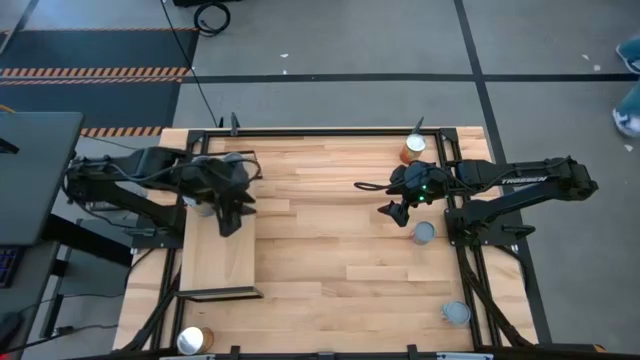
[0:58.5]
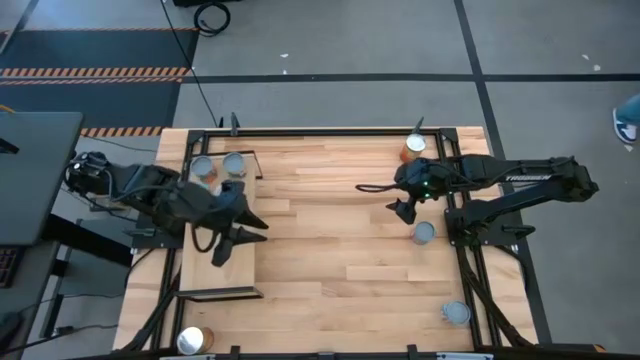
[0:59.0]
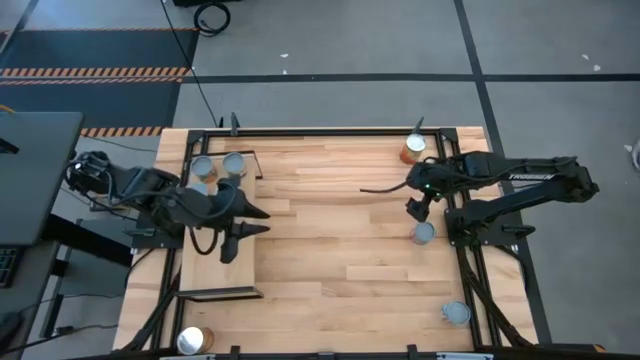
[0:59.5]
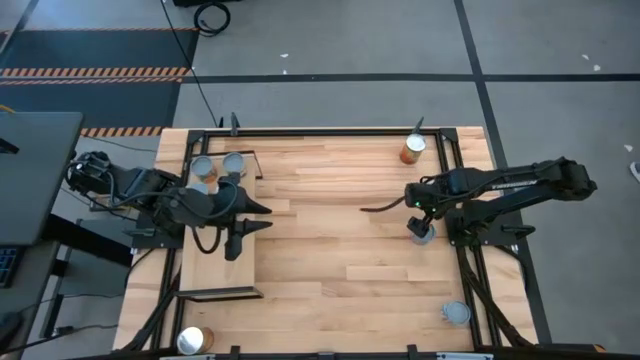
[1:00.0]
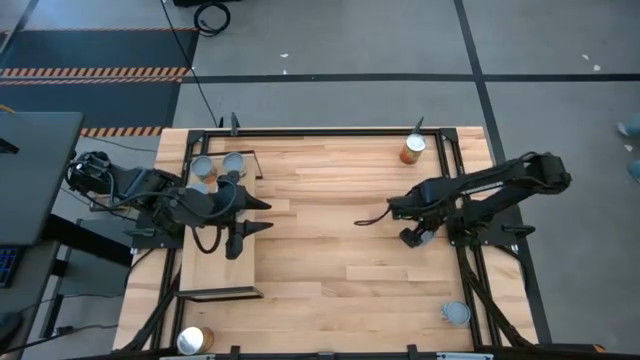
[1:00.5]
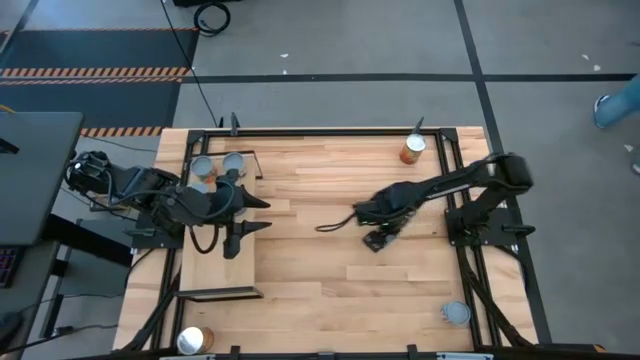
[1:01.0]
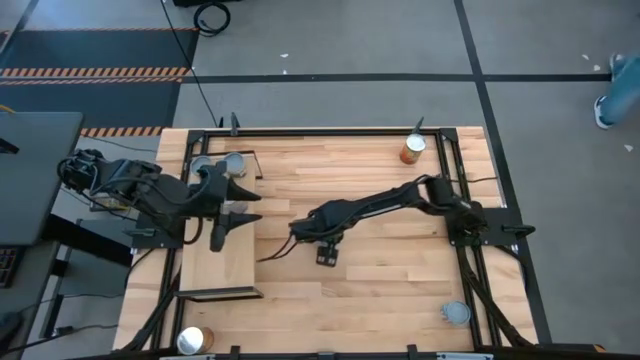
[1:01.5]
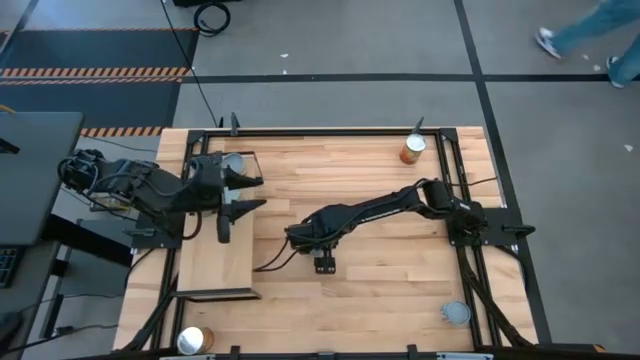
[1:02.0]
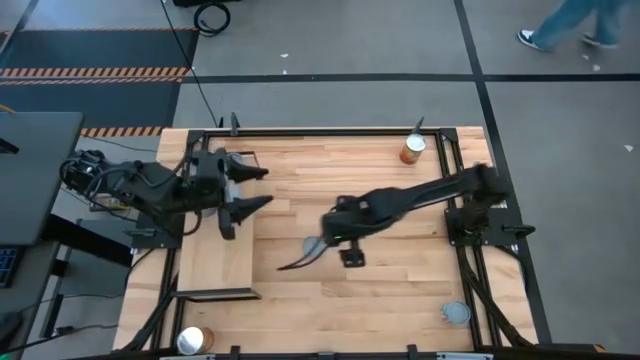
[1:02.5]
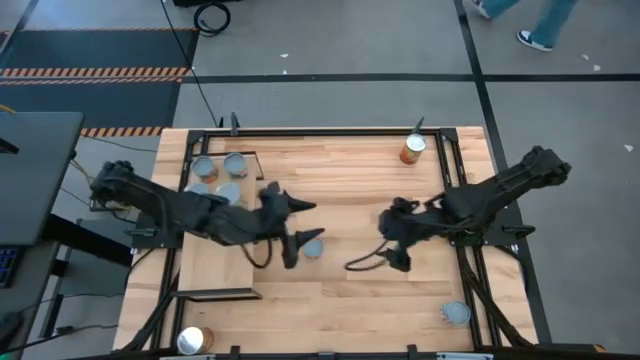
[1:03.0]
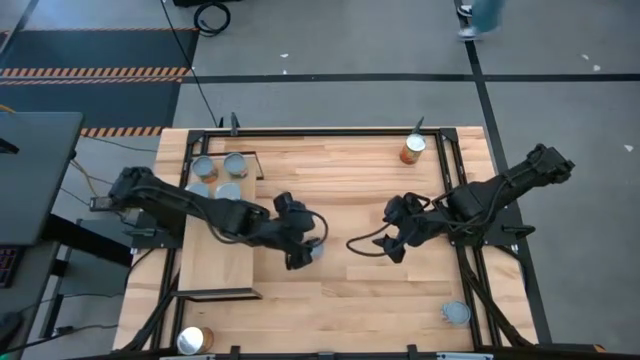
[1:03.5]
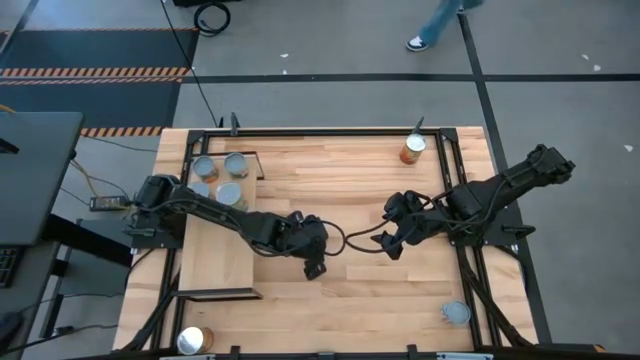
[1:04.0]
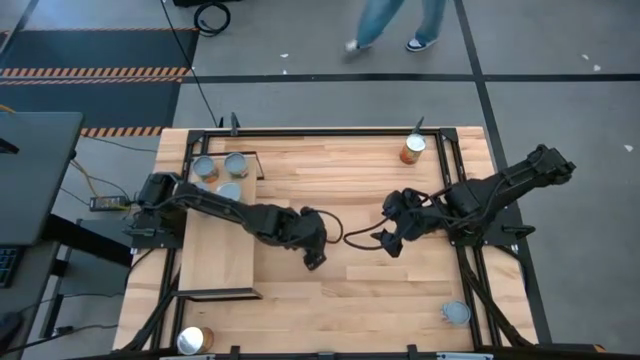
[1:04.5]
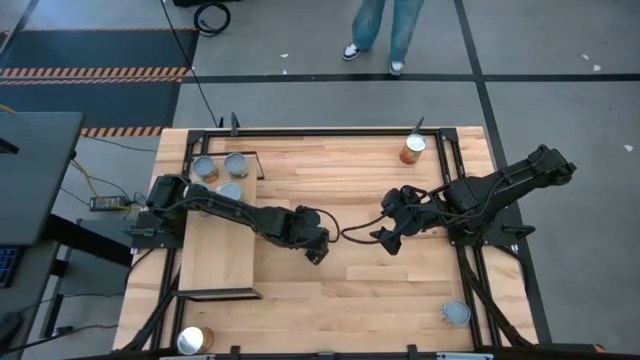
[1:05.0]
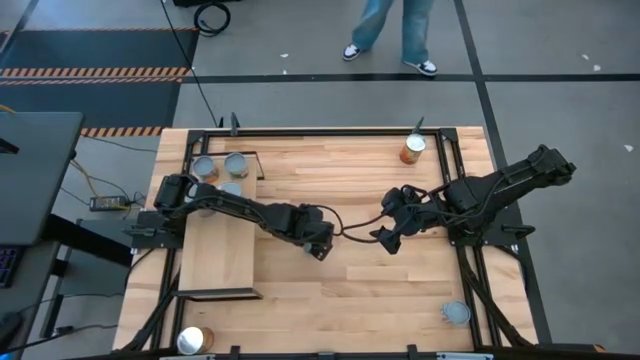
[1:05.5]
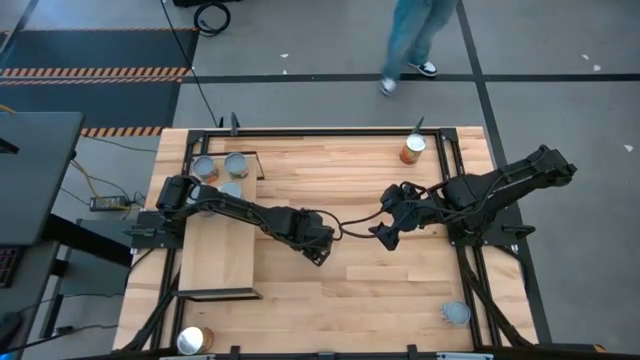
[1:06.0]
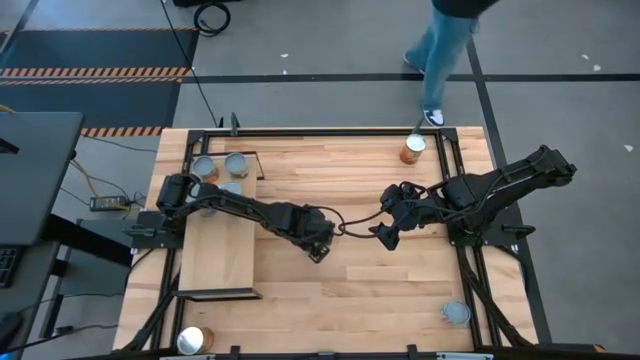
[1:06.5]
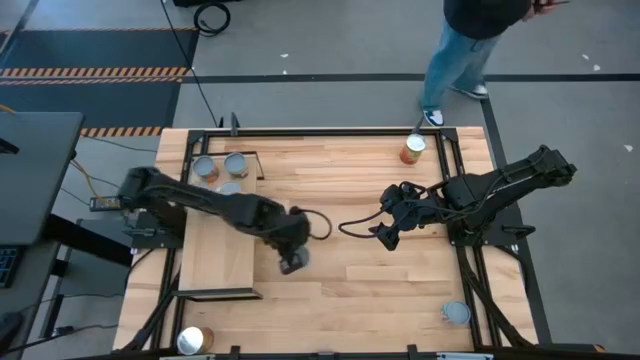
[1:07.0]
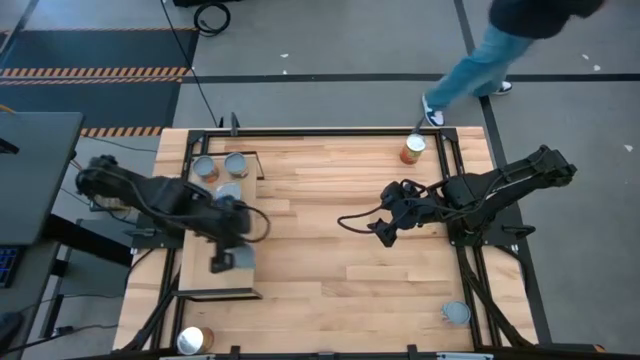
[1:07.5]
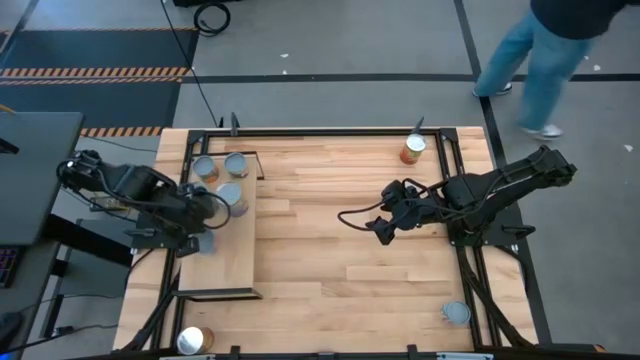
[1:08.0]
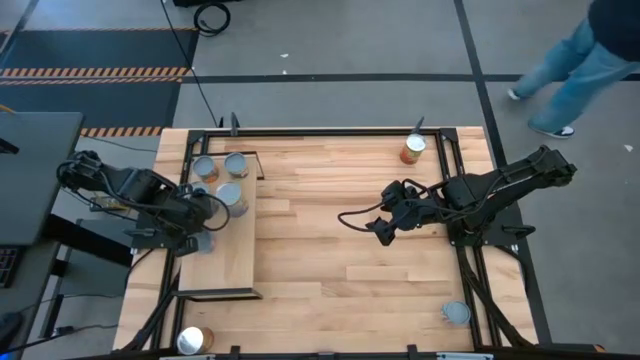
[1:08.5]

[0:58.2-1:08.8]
Task: Pick and place cans onto a shelf
Put the canned peas on the shelf

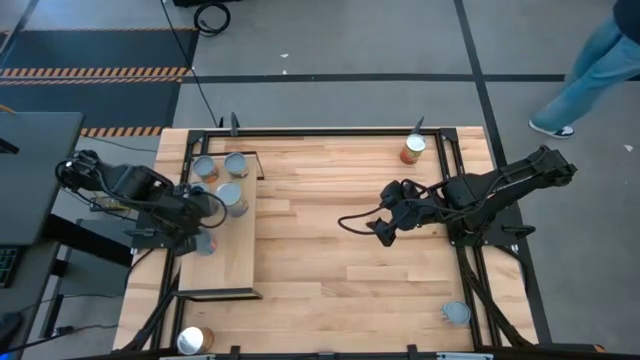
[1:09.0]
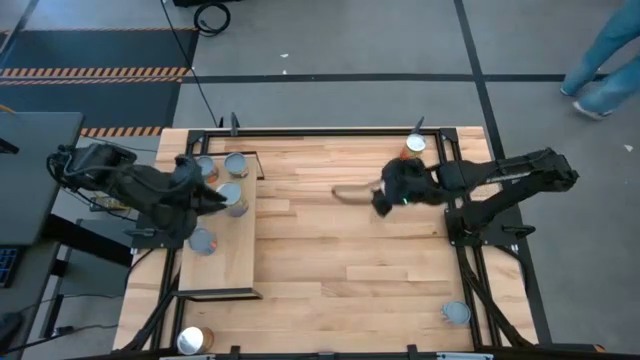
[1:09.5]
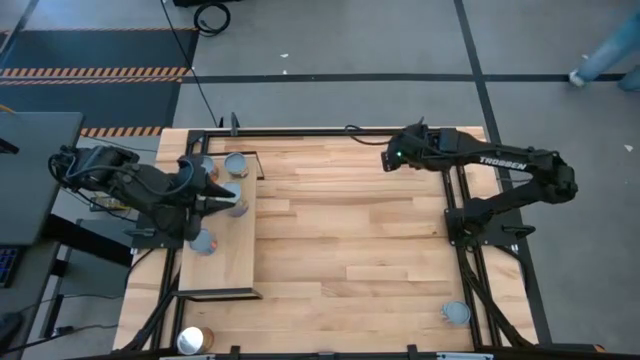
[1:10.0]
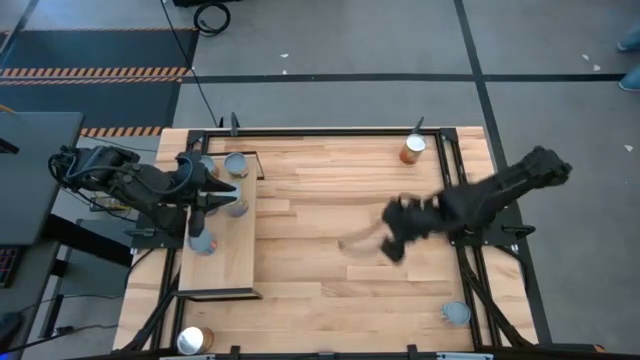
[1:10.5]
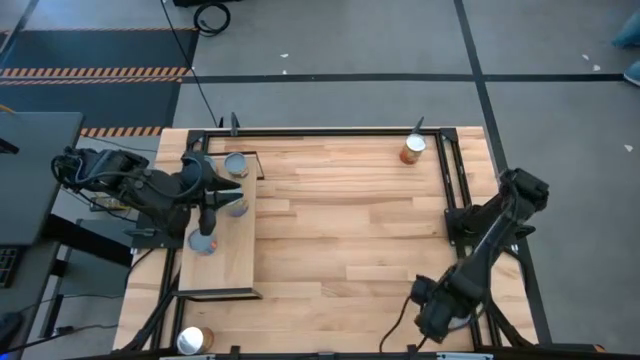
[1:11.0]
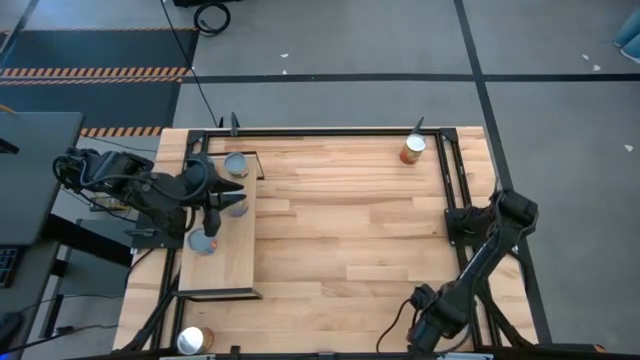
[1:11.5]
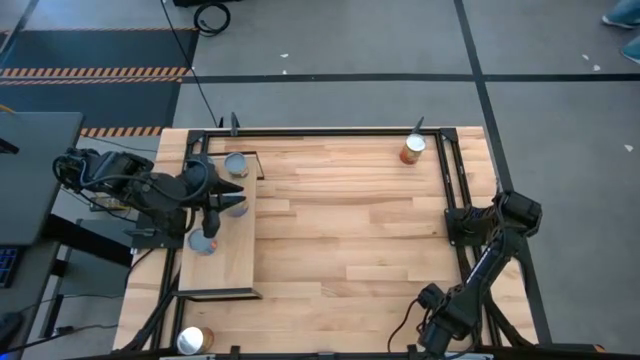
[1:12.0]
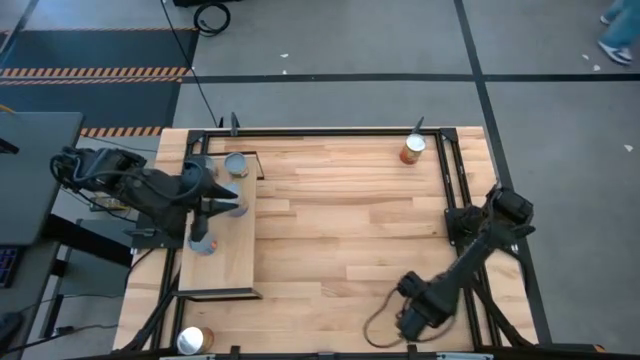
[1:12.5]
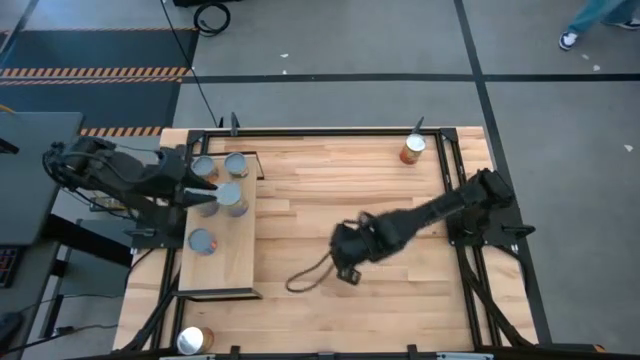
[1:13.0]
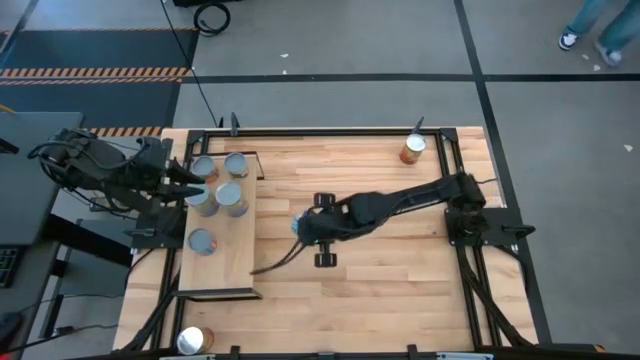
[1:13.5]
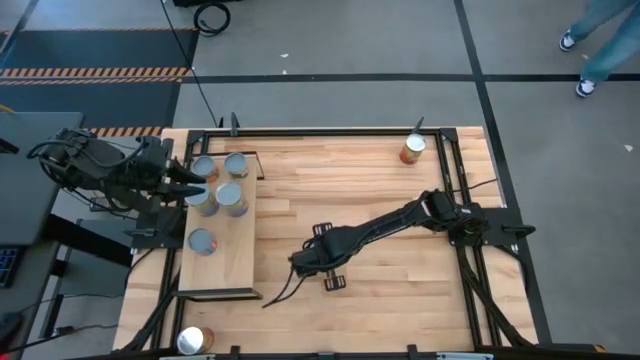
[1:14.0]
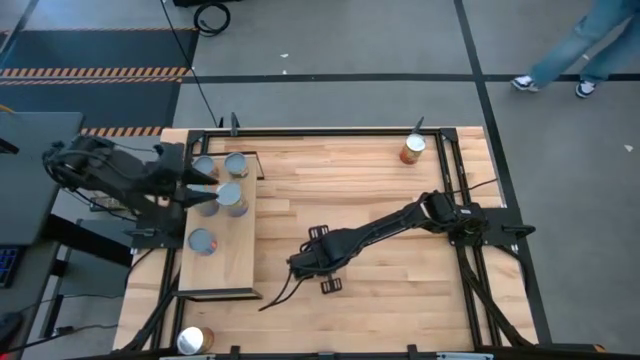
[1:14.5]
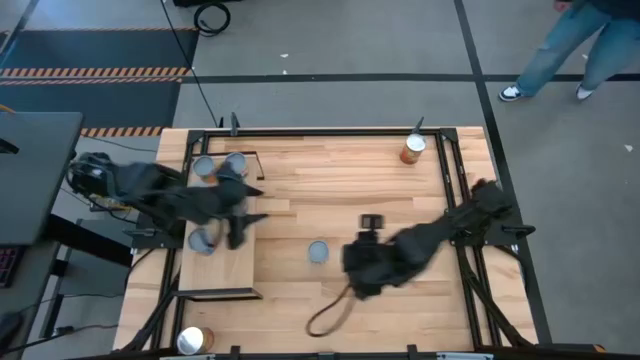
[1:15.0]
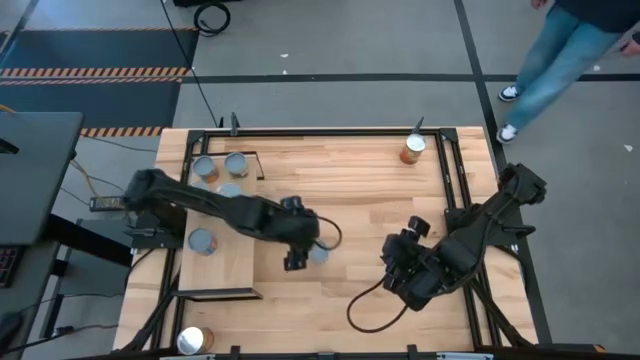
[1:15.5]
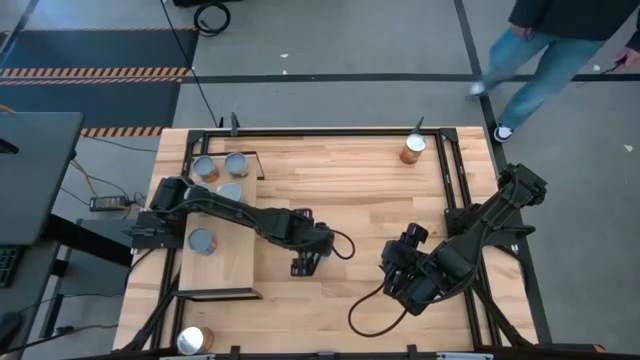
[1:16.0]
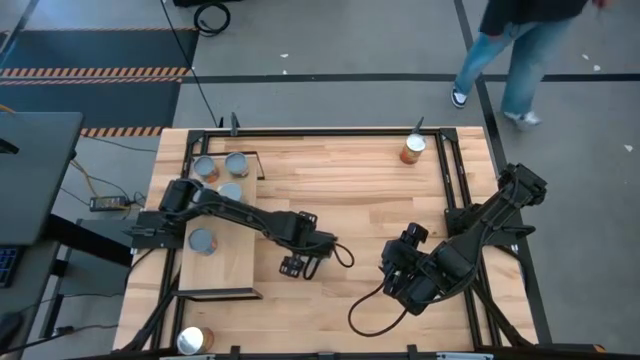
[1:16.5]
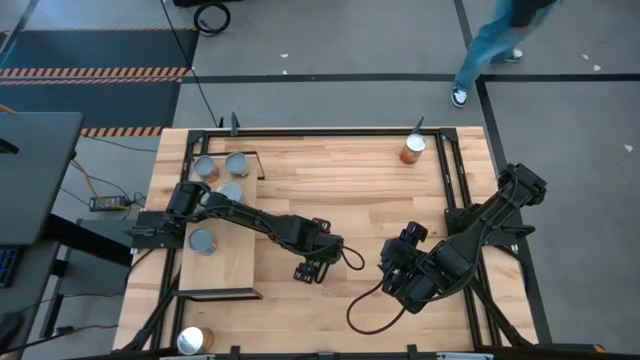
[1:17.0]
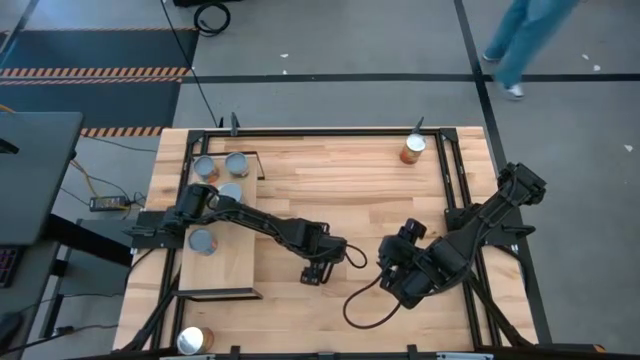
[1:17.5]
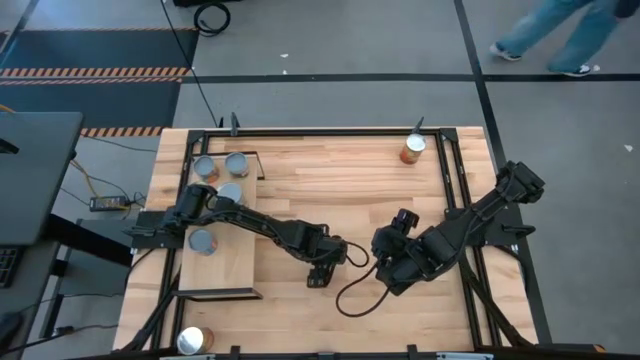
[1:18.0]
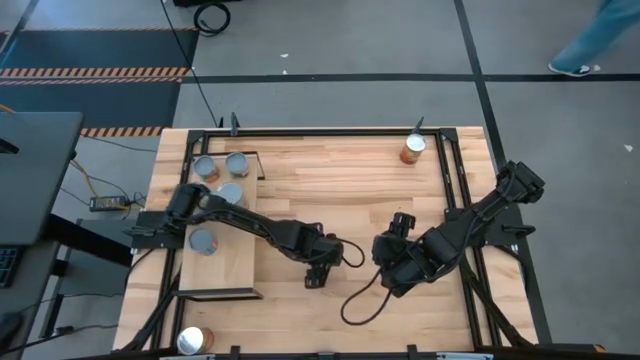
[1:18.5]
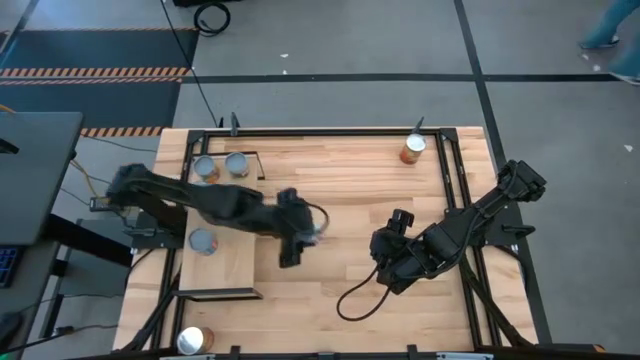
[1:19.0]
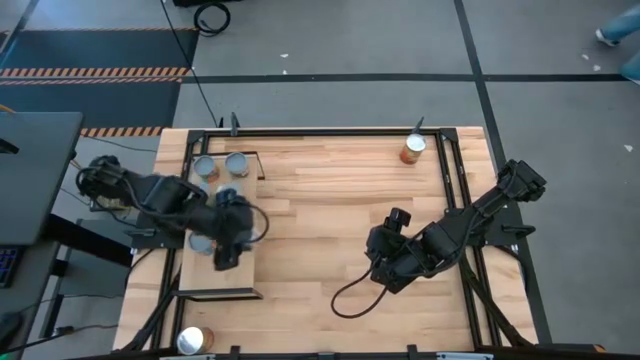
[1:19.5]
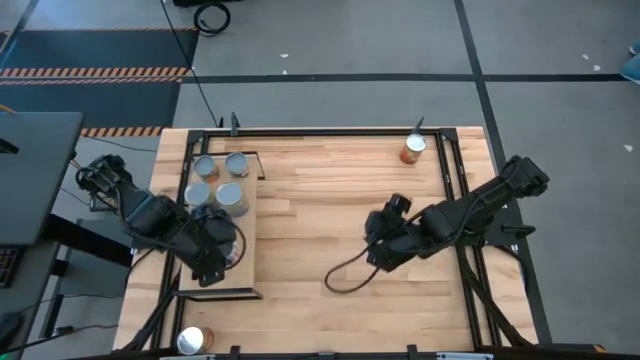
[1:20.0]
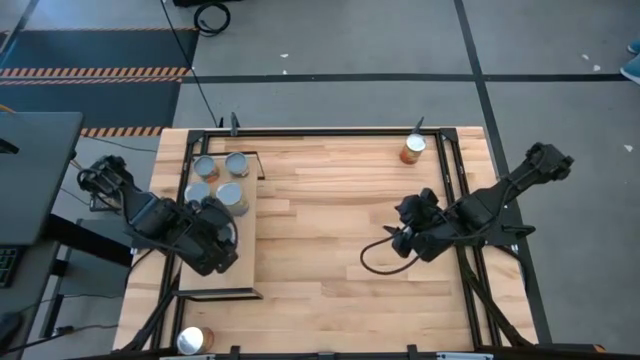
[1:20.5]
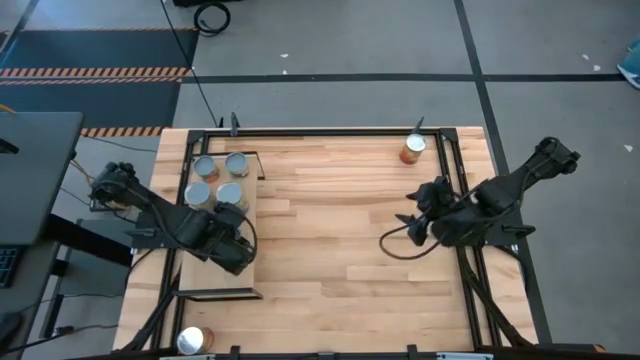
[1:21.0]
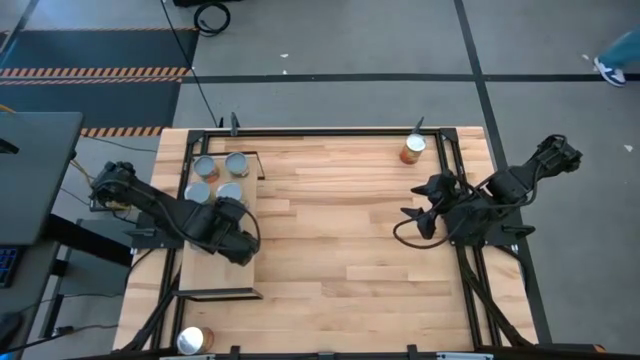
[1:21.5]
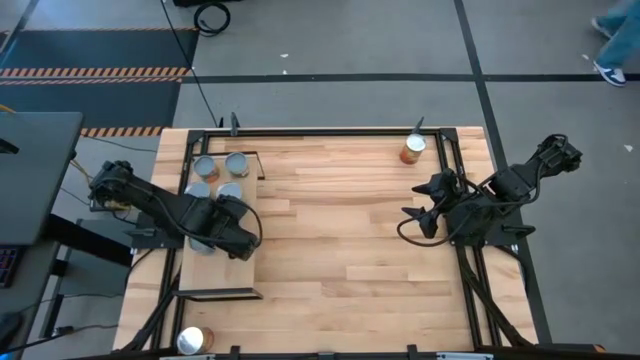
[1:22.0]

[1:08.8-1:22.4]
Put the canned carrots on the shelf
